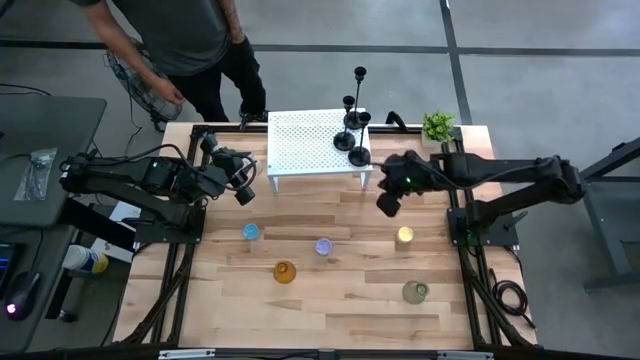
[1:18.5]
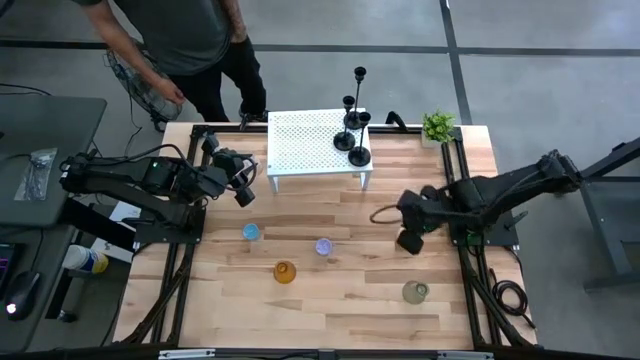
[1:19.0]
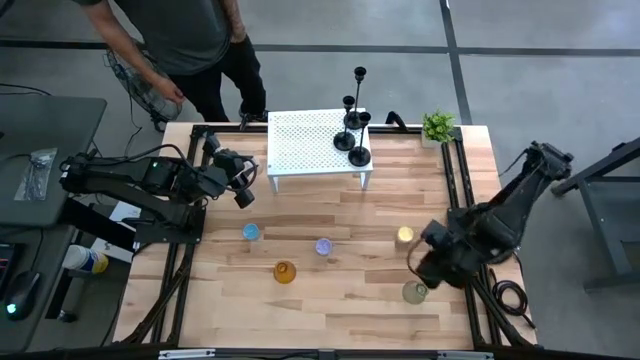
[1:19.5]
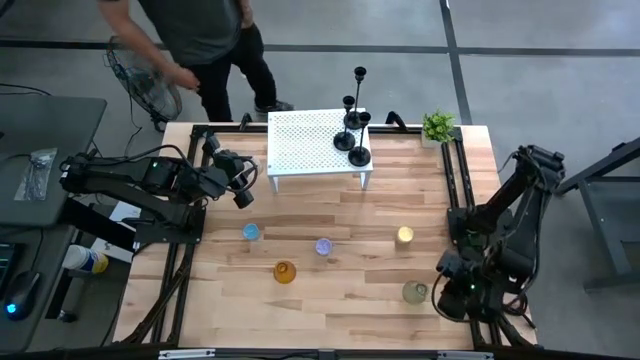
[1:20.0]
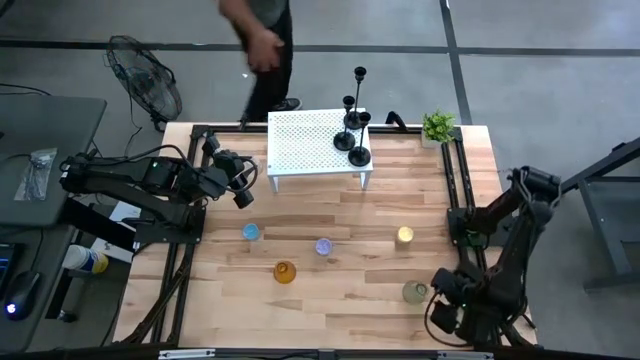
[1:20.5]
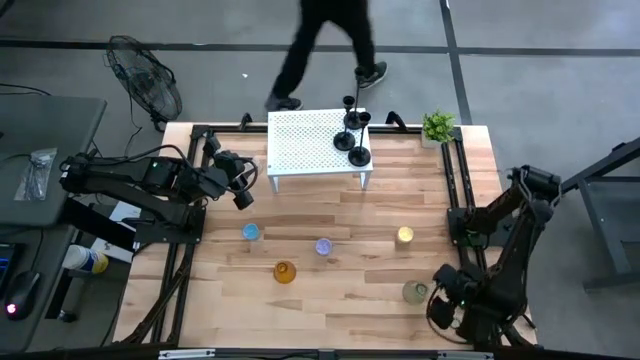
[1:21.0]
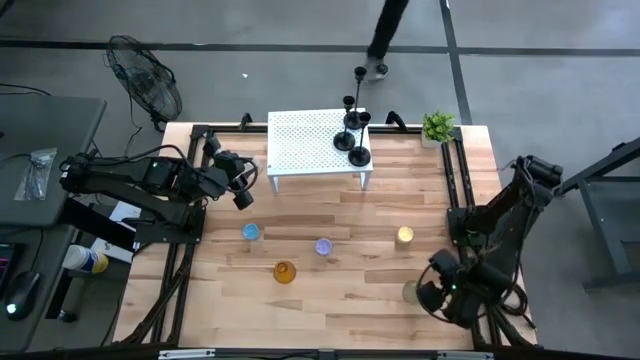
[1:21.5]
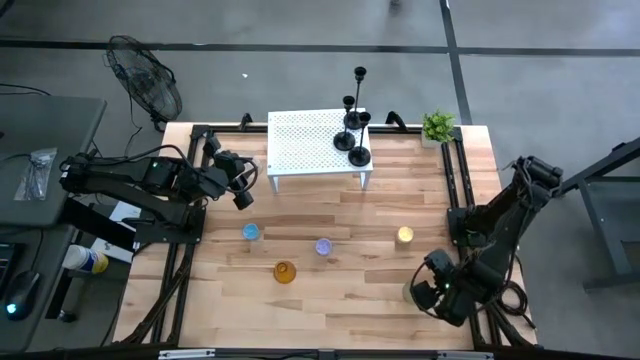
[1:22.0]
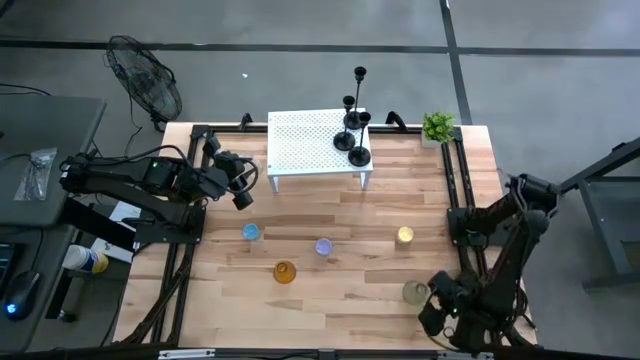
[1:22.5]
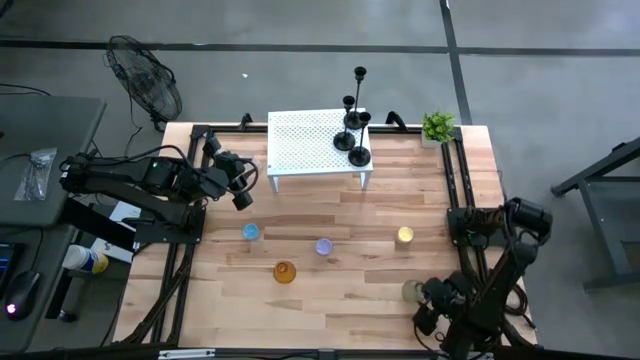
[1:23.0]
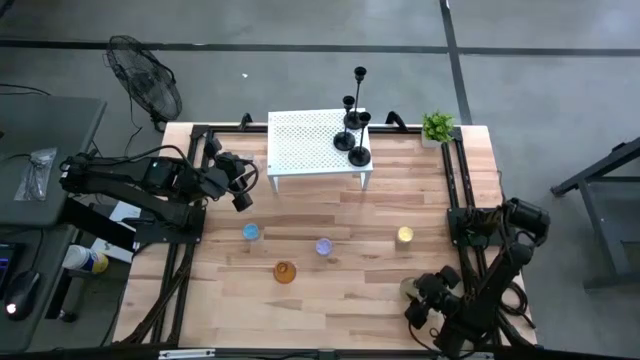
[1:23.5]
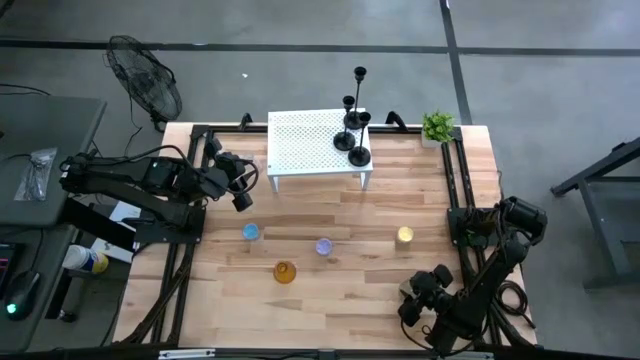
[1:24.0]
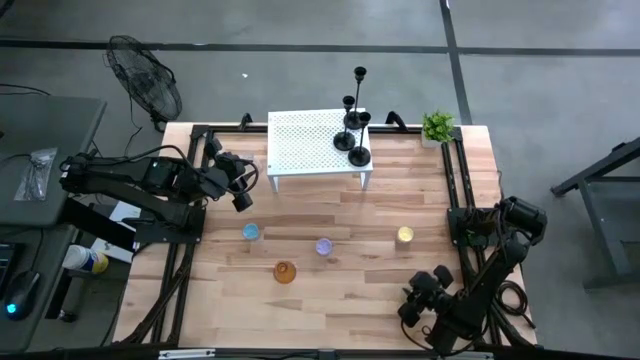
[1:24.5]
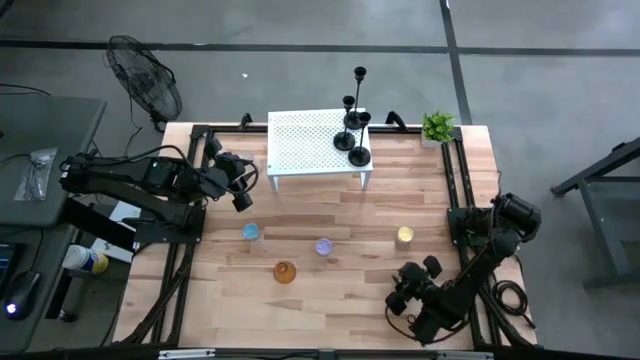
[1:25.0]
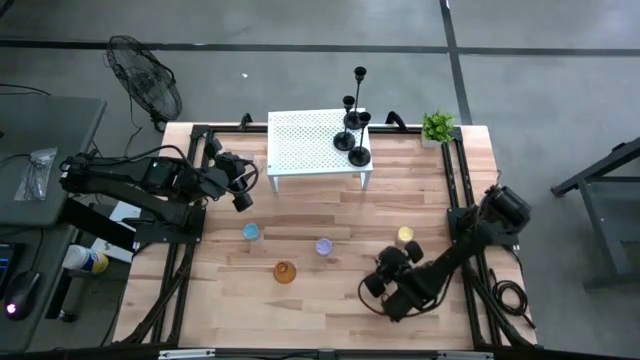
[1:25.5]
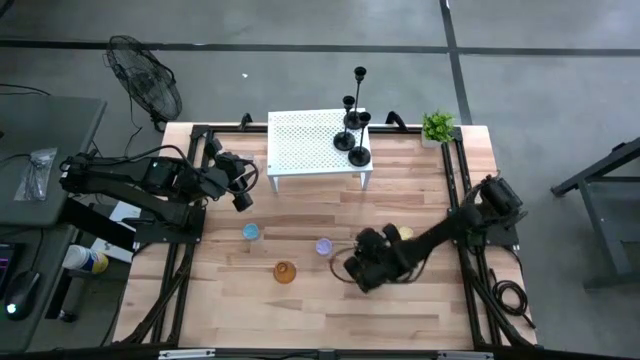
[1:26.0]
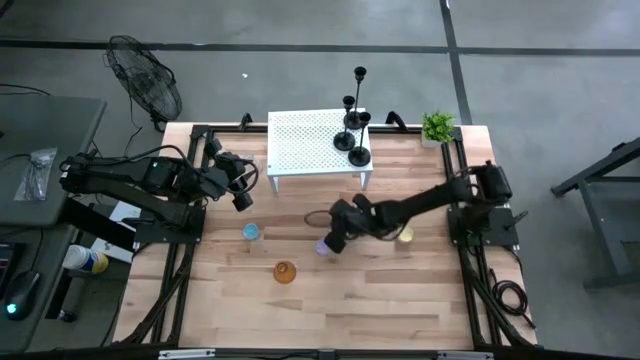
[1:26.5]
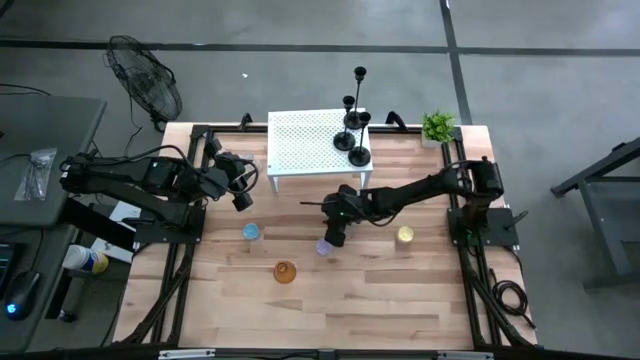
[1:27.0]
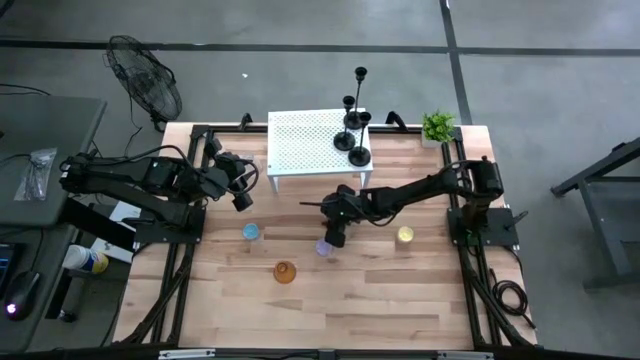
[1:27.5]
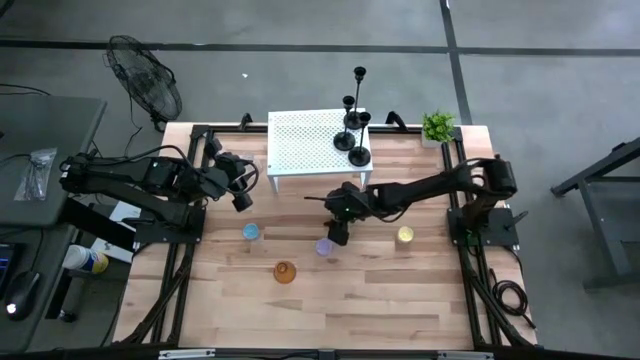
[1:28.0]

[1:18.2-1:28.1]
Task: Pick & Place candle stick holders
Move the gray candle holder to the center of the table

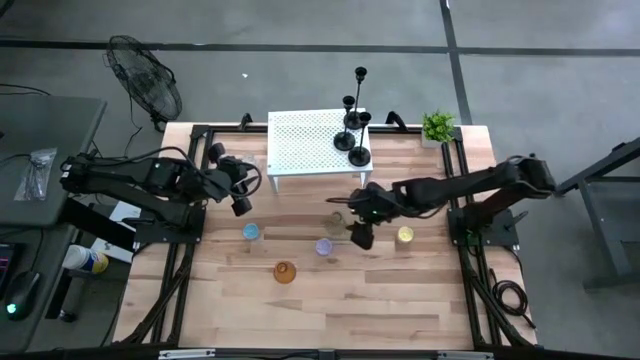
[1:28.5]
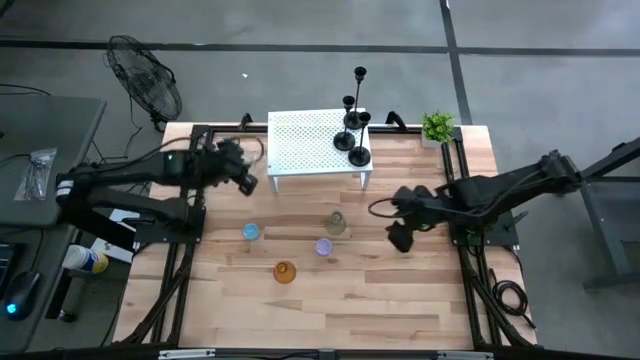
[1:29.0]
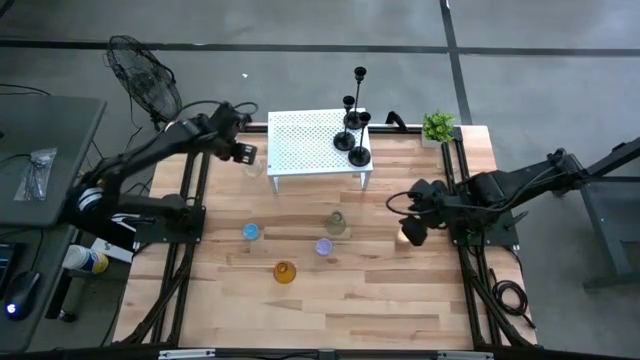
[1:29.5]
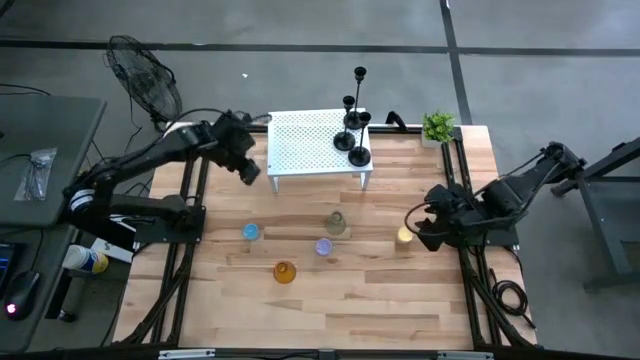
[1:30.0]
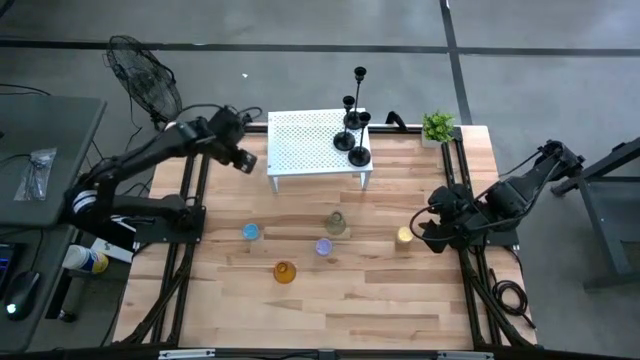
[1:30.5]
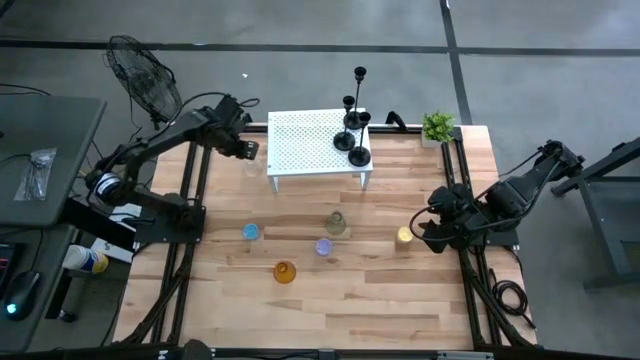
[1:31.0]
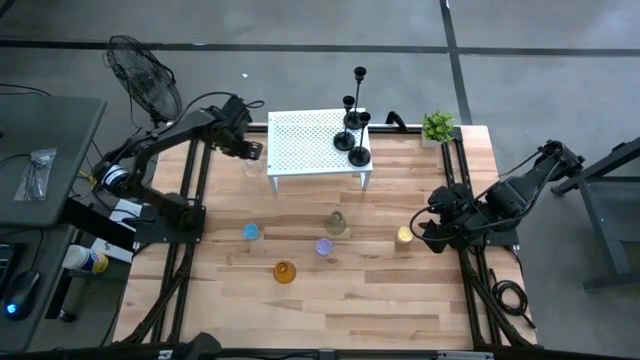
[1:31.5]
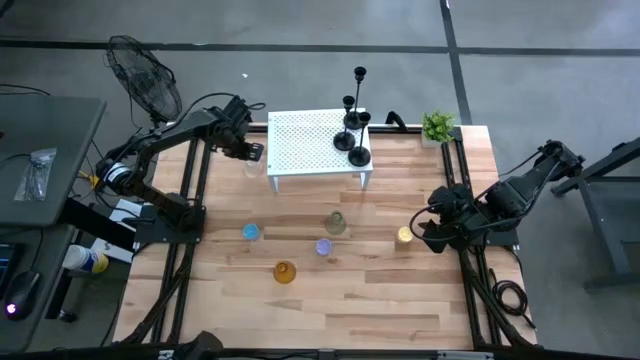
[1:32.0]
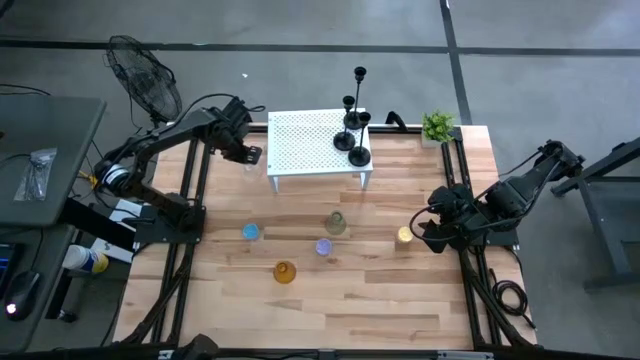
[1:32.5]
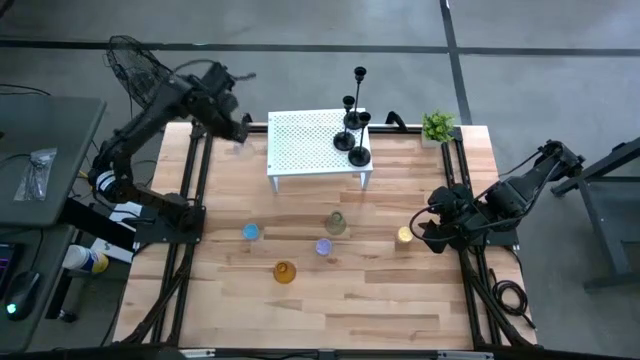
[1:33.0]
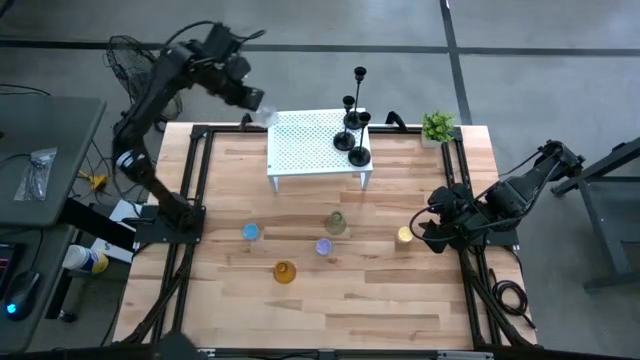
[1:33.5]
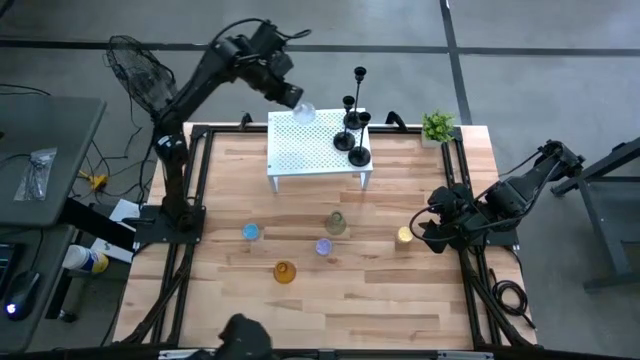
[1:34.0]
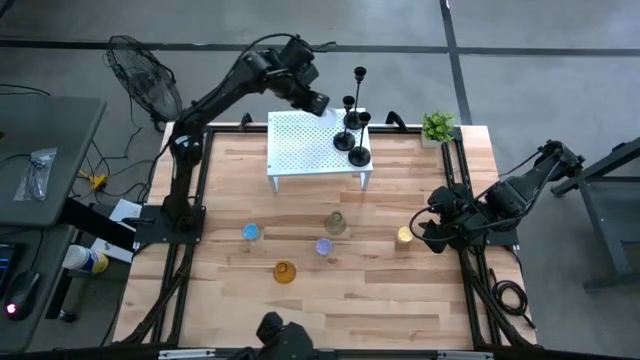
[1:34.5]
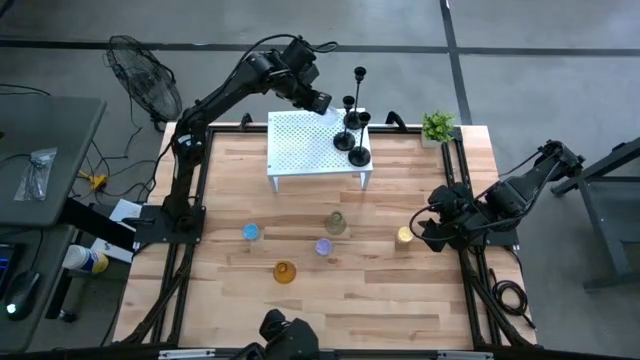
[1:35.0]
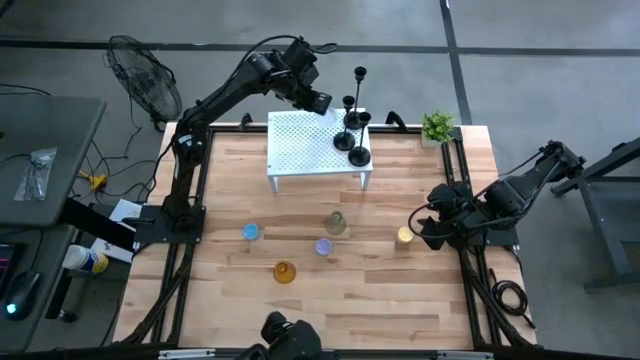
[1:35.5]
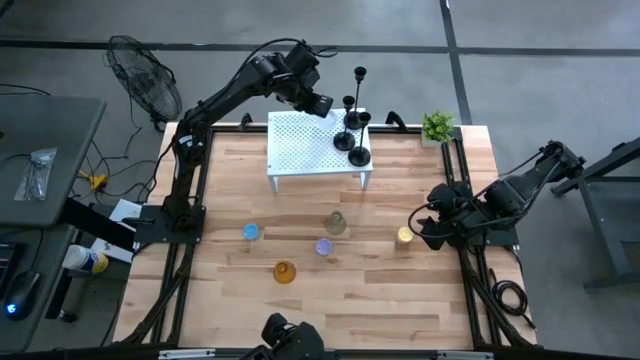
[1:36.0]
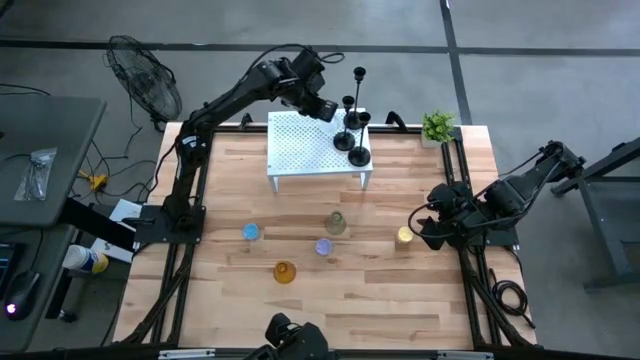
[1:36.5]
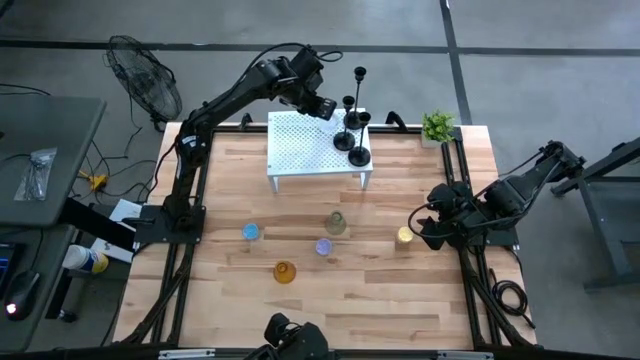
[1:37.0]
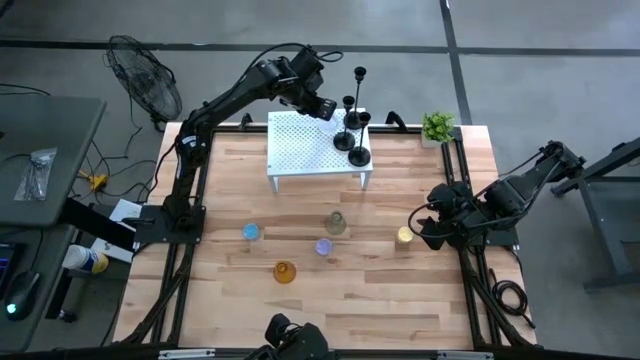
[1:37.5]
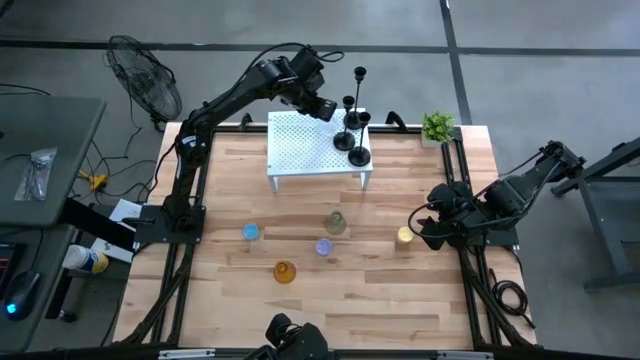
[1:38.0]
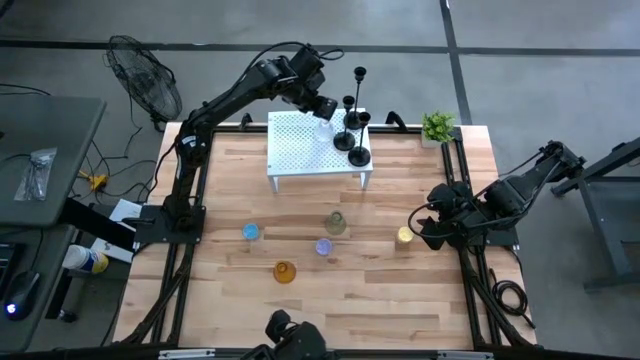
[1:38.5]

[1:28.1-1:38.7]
Put the transparent candle holder on the shelf
